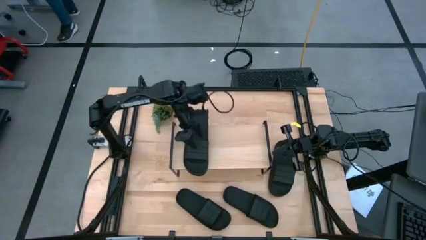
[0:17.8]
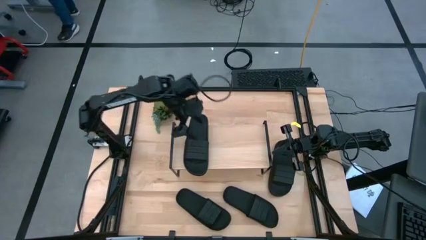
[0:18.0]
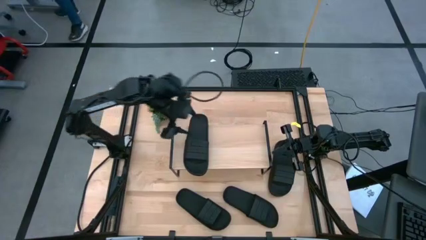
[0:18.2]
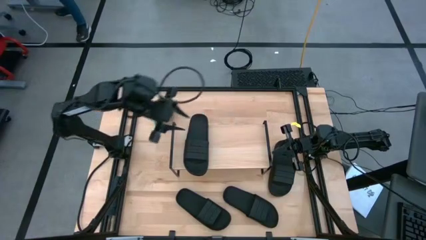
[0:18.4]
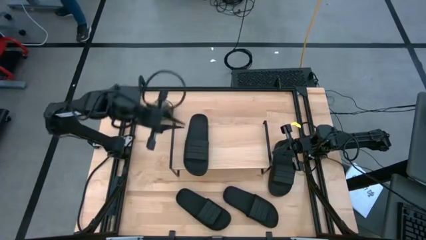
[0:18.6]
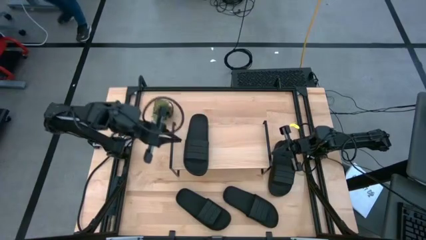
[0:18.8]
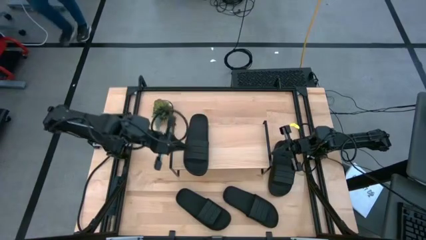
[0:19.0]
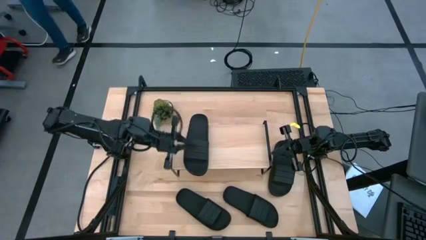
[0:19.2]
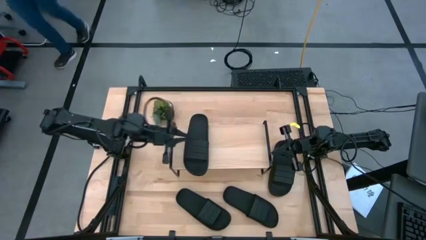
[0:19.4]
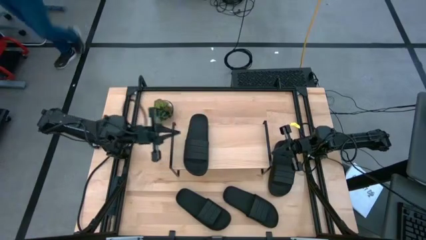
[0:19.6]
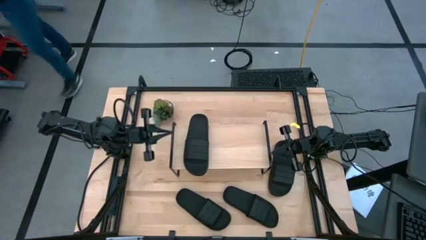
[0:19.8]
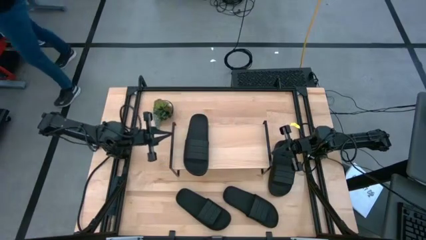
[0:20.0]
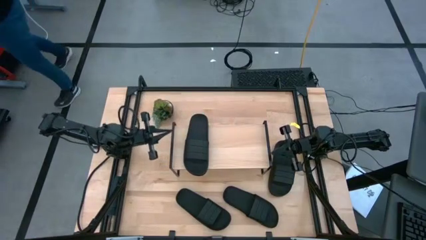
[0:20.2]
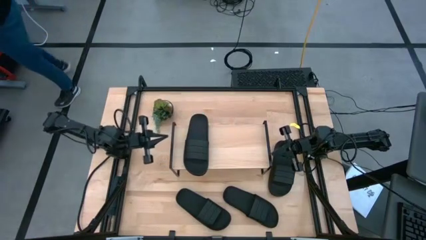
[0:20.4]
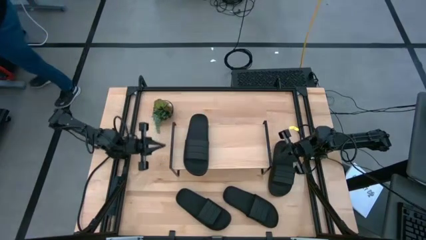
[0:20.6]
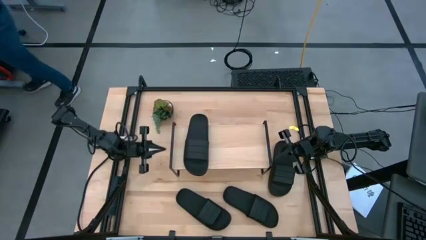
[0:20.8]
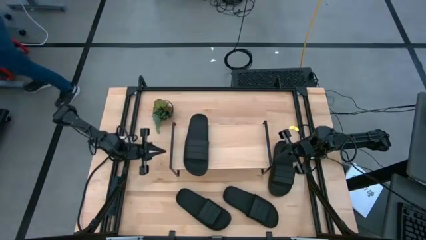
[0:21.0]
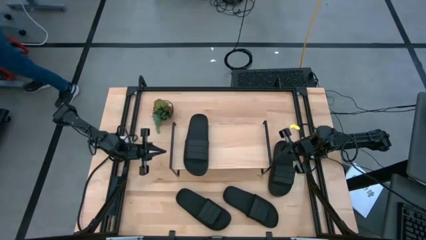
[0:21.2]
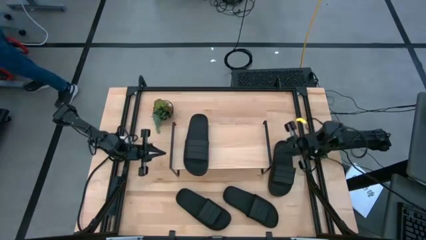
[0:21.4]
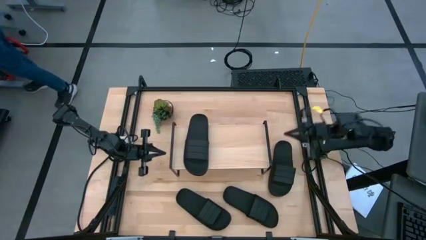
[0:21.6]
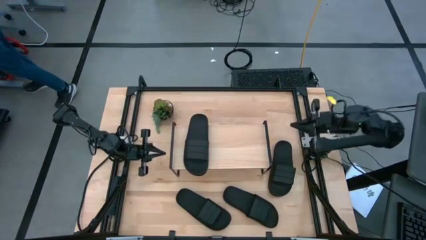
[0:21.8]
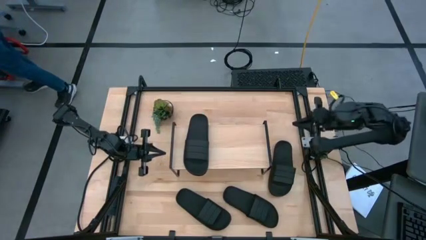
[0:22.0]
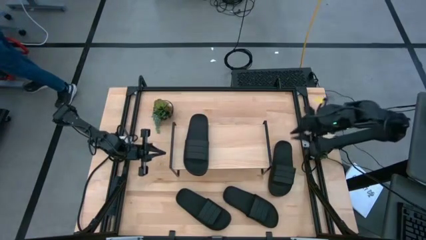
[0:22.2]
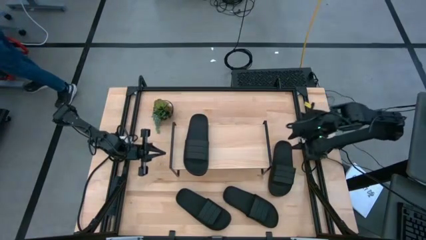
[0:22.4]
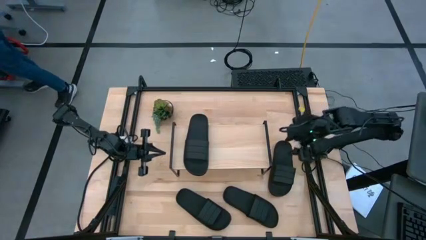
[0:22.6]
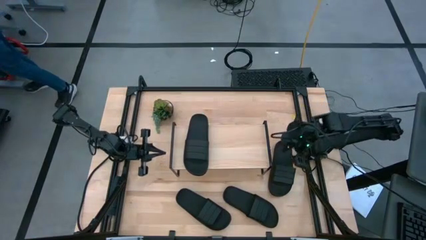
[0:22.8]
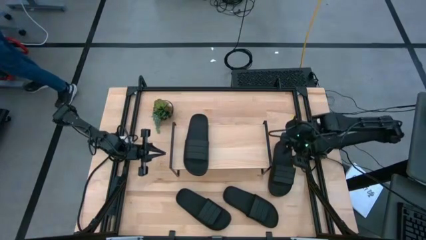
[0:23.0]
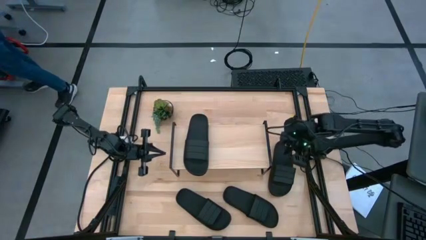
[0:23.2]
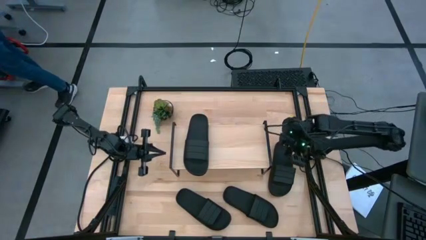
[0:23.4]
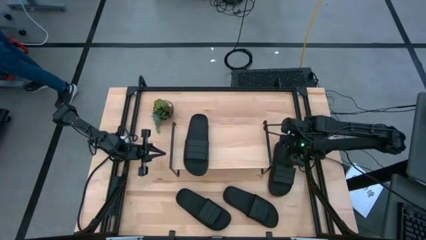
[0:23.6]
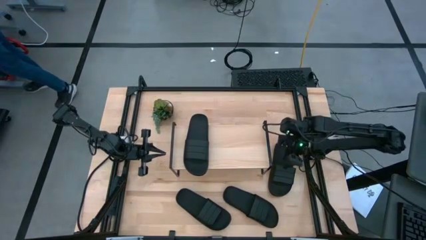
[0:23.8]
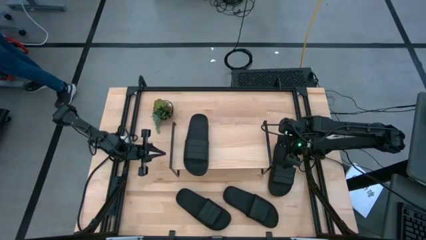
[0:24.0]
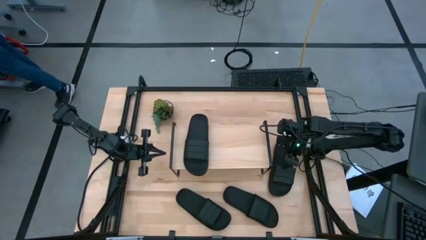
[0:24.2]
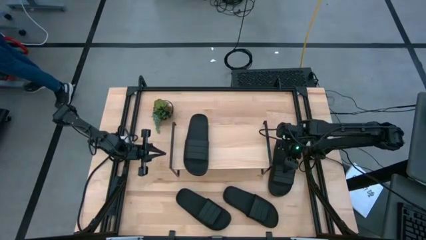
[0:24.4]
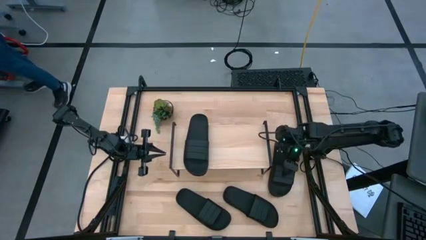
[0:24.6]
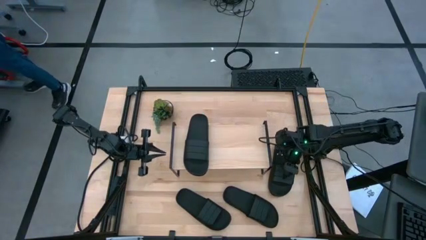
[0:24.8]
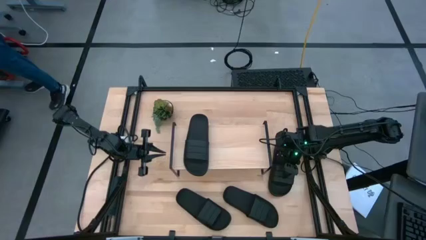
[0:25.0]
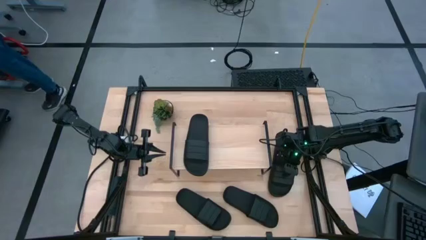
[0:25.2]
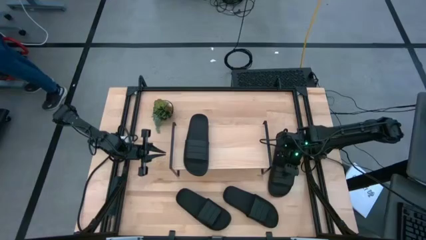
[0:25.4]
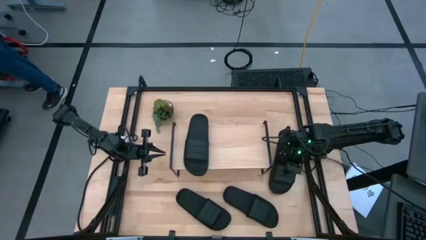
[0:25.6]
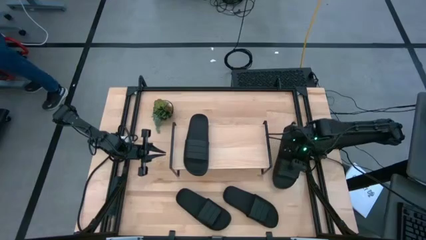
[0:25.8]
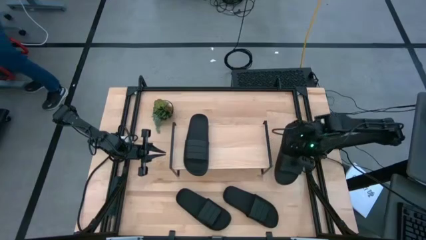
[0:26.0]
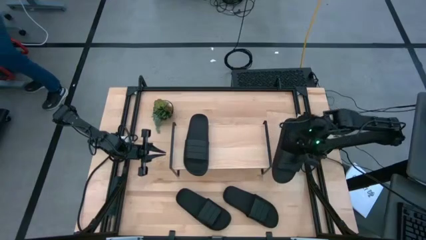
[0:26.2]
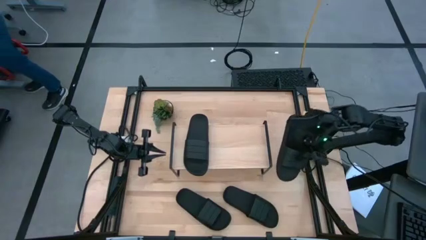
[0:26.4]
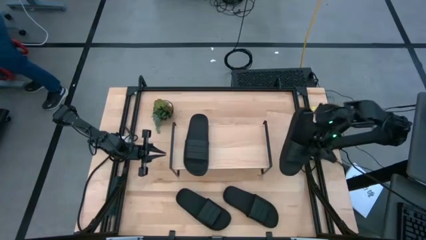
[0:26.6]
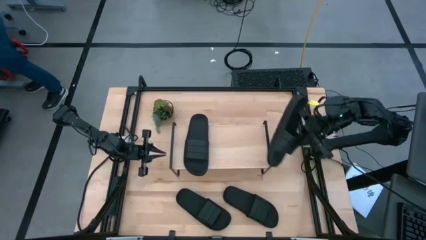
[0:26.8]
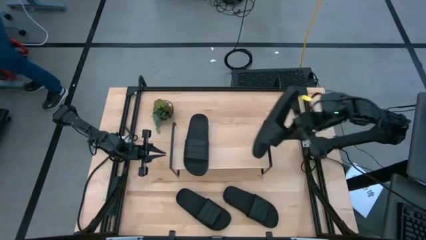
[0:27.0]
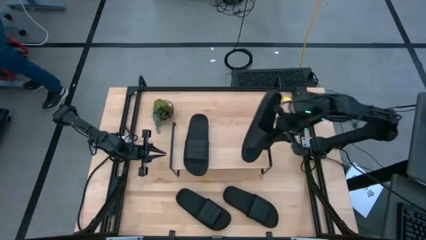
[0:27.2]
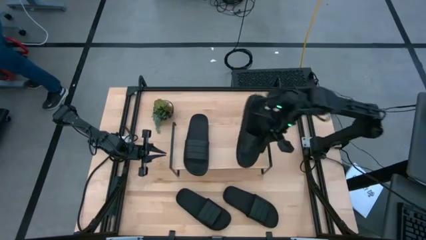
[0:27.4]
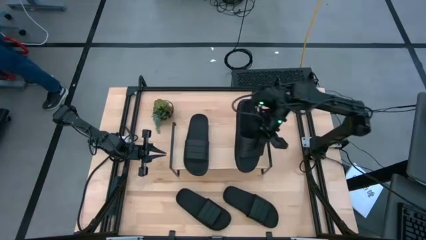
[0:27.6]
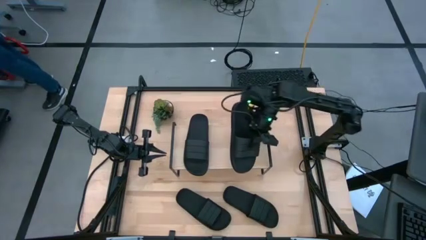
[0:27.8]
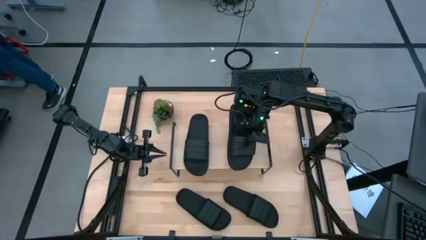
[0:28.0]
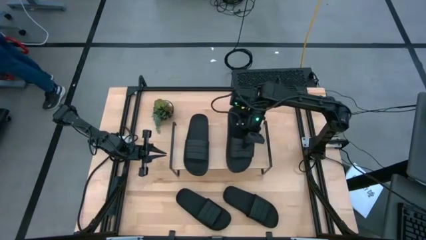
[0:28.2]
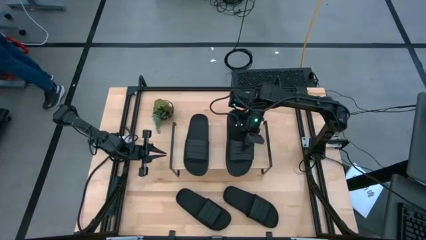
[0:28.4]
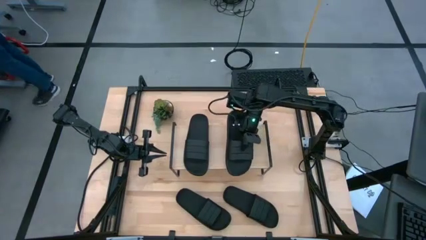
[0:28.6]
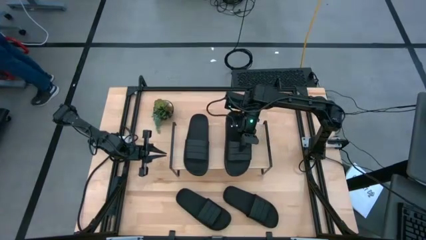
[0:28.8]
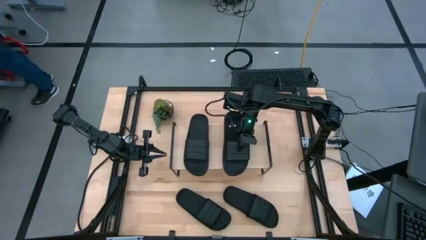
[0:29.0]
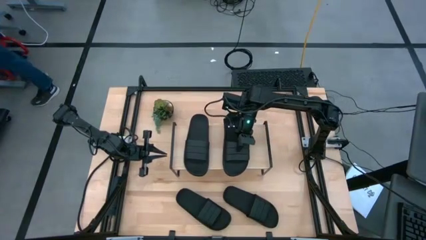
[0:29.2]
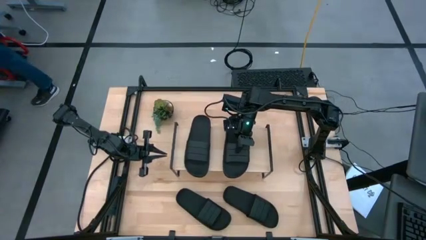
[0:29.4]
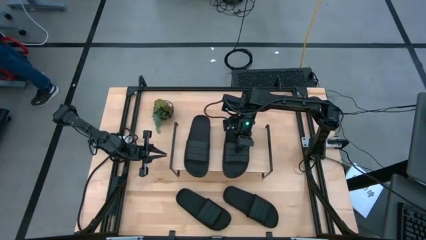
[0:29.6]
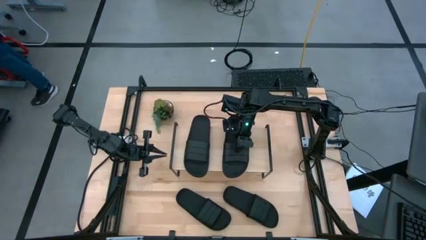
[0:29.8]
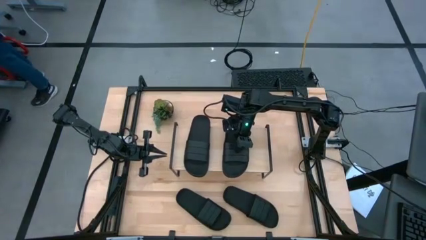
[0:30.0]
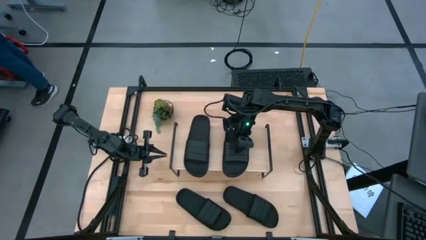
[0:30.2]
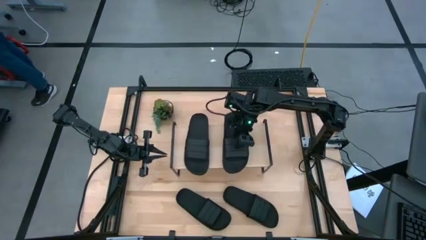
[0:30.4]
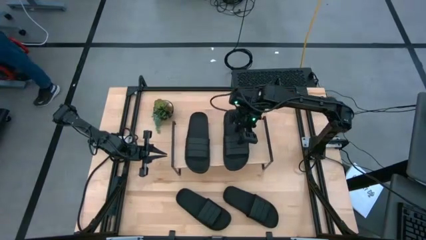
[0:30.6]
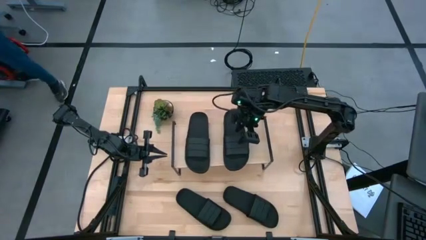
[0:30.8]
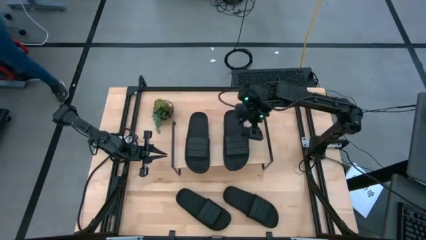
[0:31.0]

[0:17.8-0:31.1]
Task: Pick and place slides into the shelf
Put the black slipper on the shelf

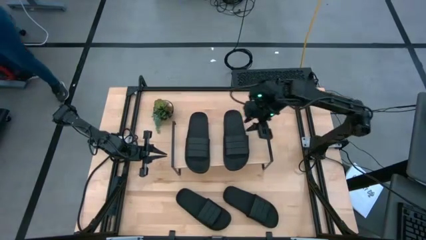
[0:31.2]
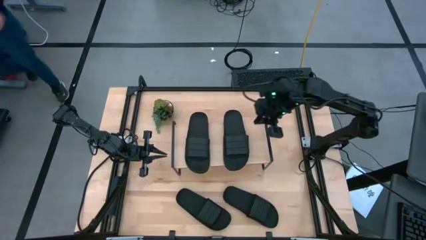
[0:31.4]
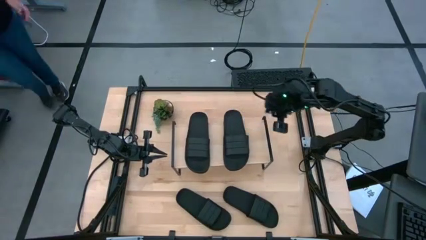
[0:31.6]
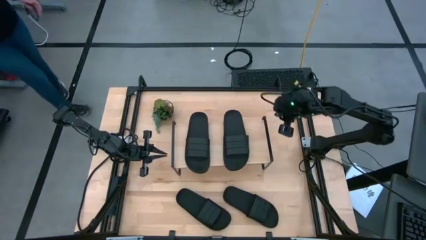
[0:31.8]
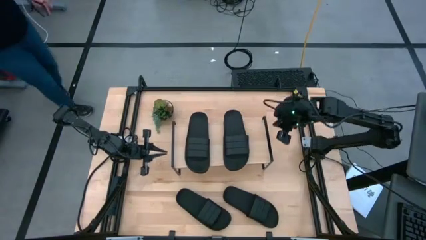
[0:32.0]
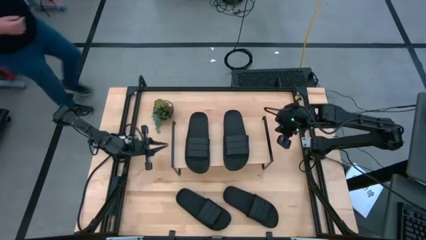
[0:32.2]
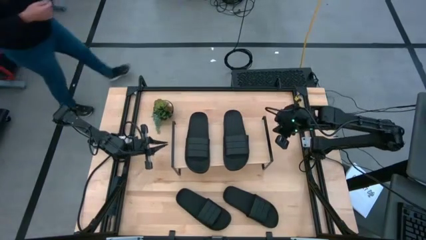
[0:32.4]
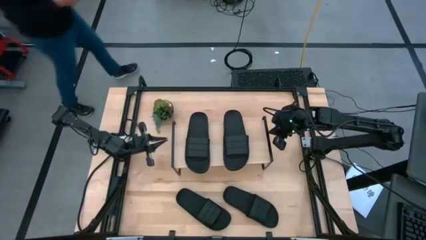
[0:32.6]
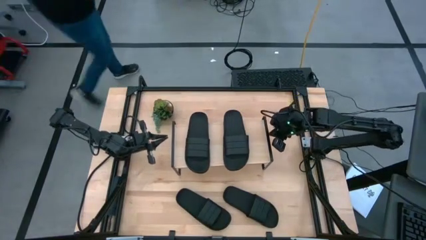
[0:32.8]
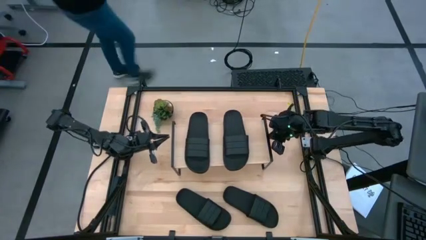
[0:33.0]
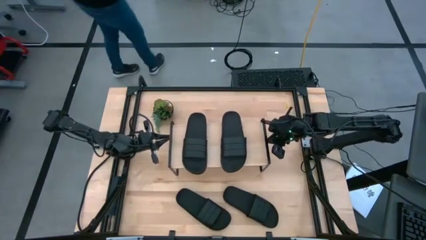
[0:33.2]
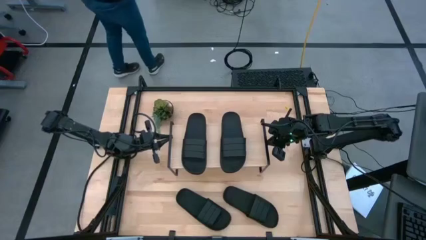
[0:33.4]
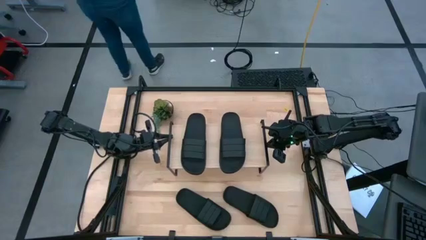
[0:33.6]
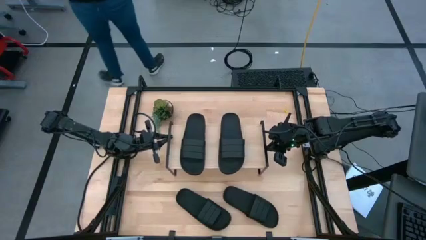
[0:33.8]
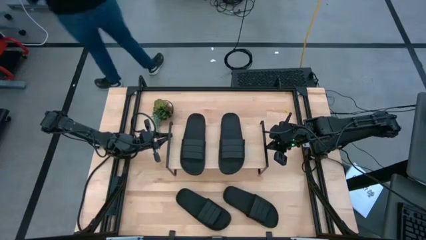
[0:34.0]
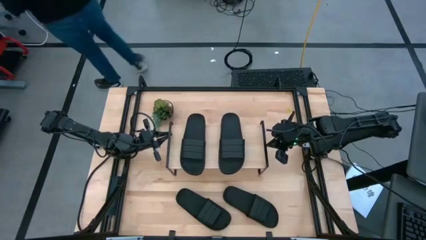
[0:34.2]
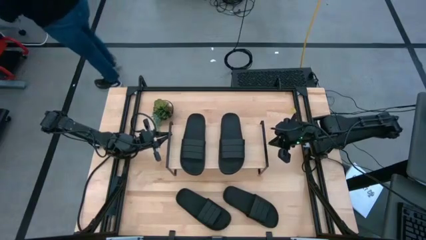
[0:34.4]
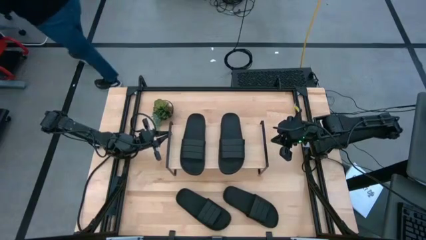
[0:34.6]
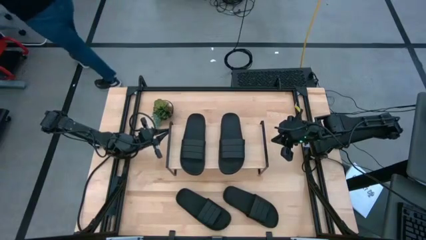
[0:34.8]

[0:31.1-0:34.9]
Adjust the shelf
